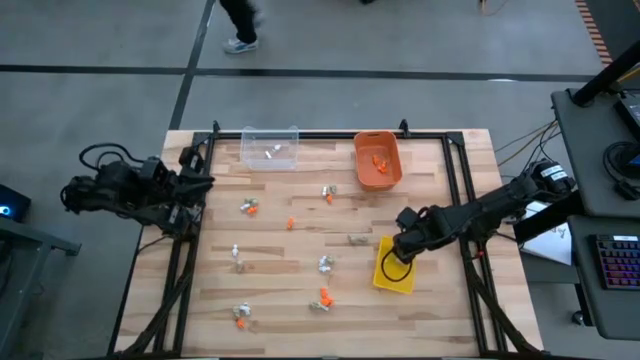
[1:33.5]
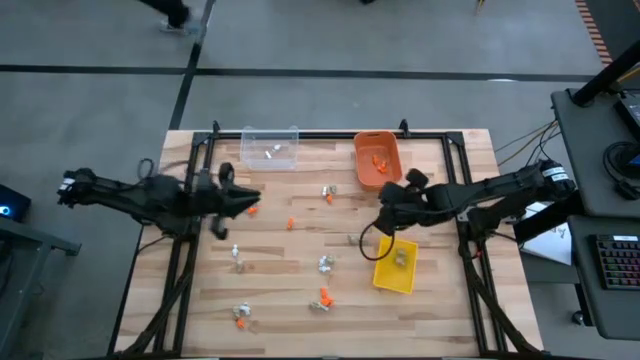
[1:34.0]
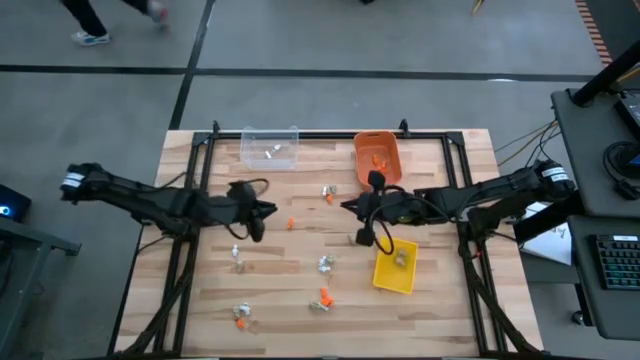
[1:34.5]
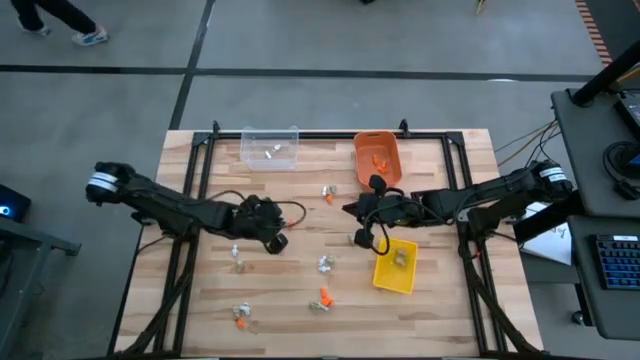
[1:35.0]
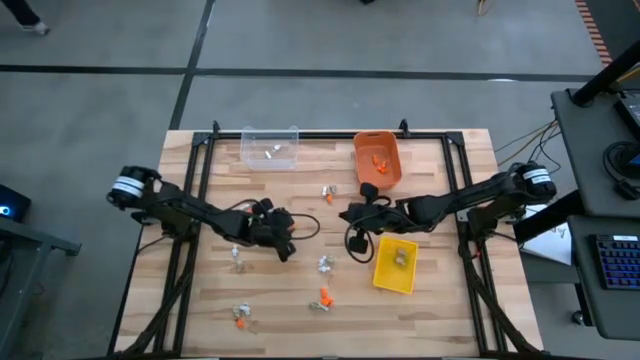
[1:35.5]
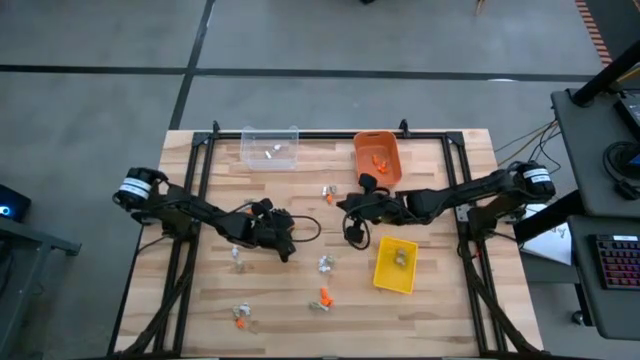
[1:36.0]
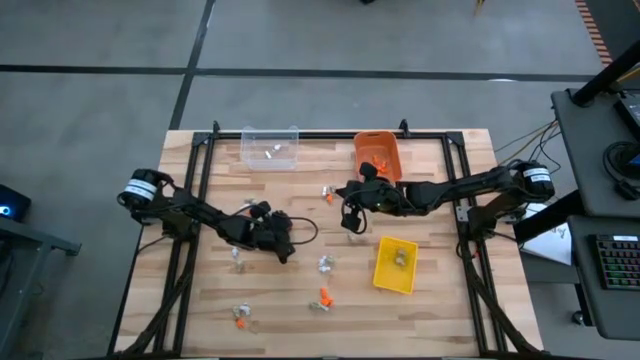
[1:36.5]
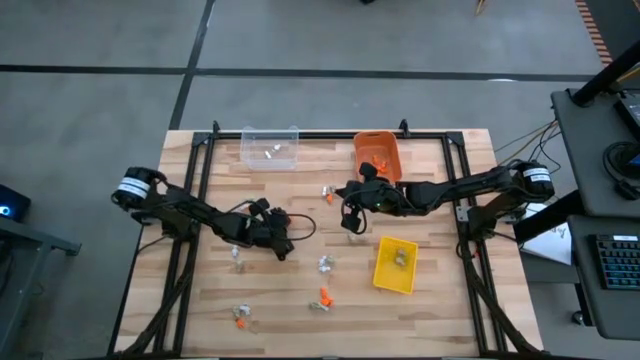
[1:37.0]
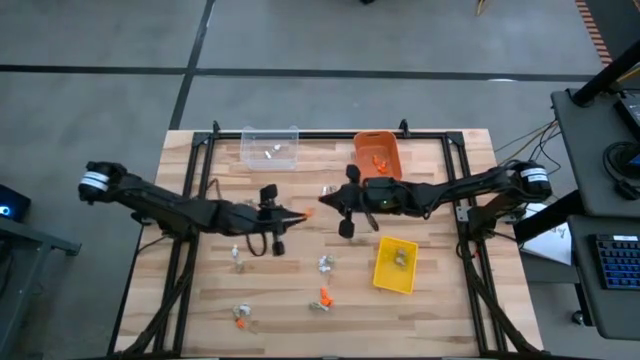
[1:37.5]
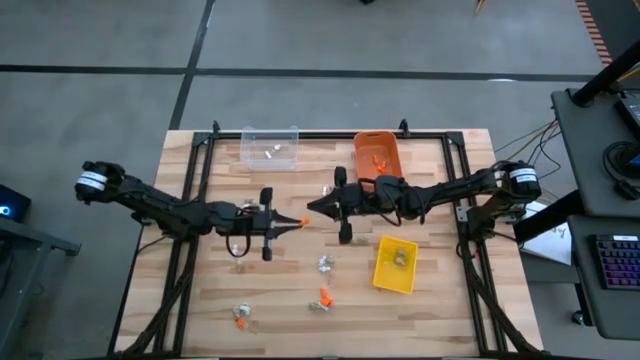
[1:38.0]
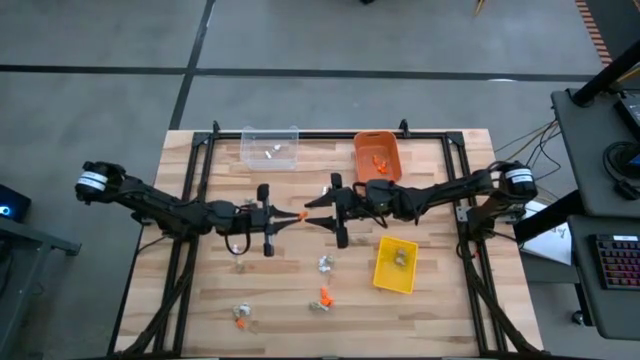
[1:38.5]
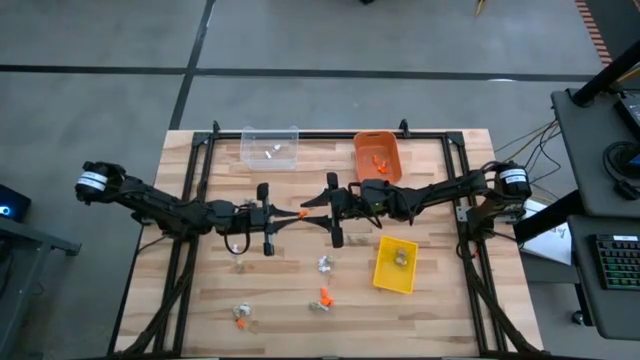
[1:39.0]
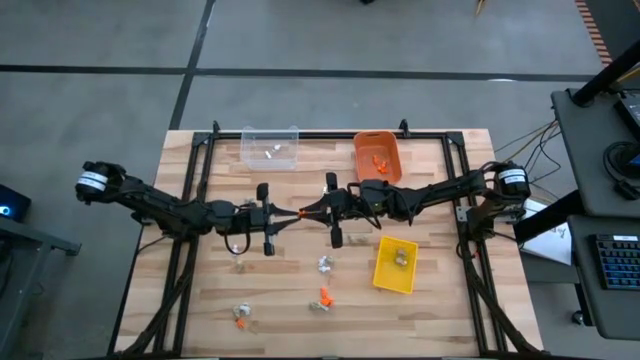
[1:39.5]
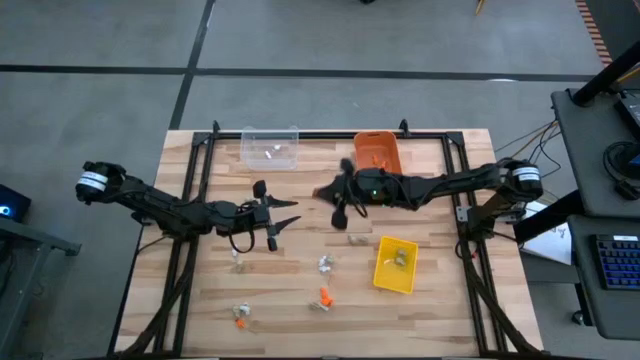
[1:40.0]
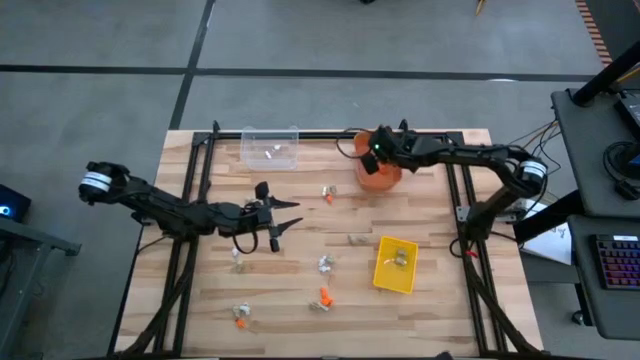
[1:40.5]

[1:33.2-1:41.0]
Task: Sort Halloween decoration
Put the orange skeleton toy into the orange bin

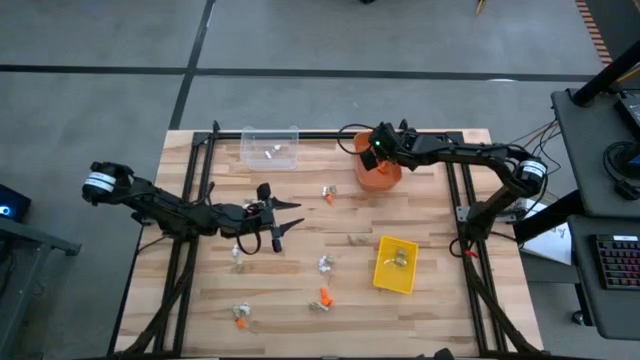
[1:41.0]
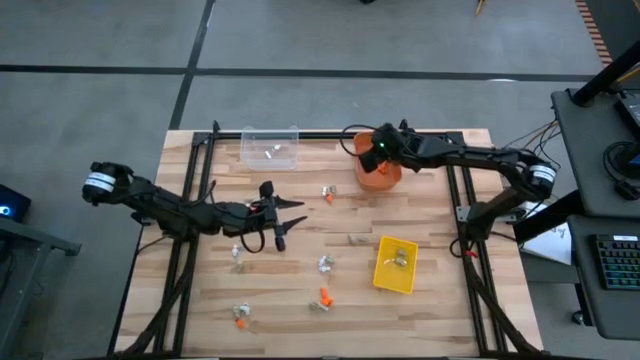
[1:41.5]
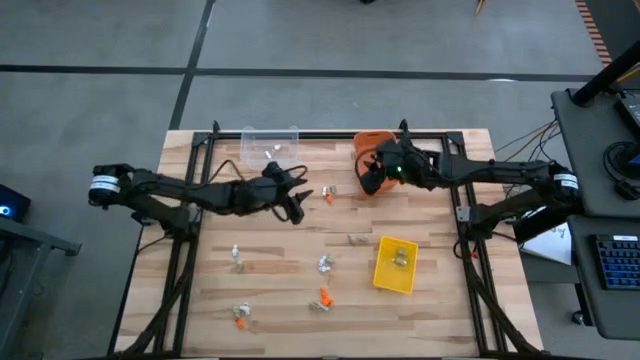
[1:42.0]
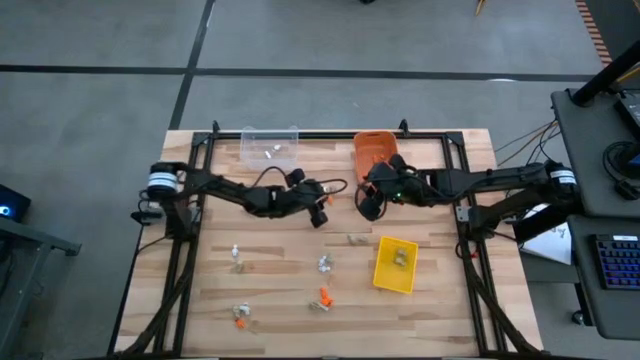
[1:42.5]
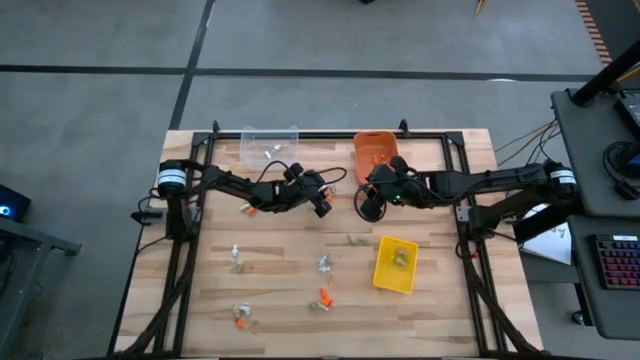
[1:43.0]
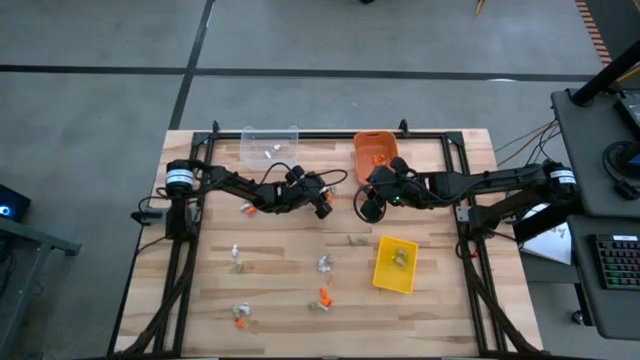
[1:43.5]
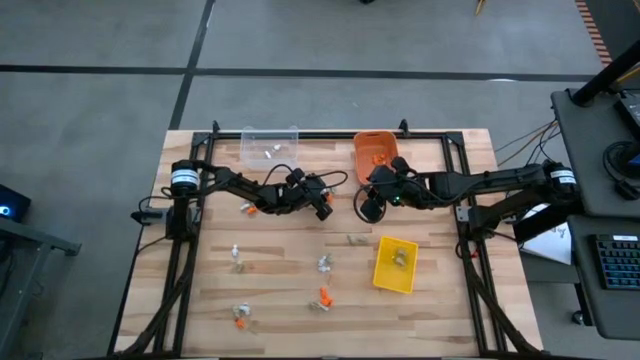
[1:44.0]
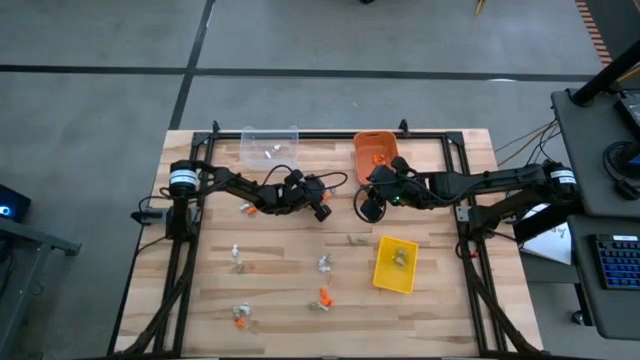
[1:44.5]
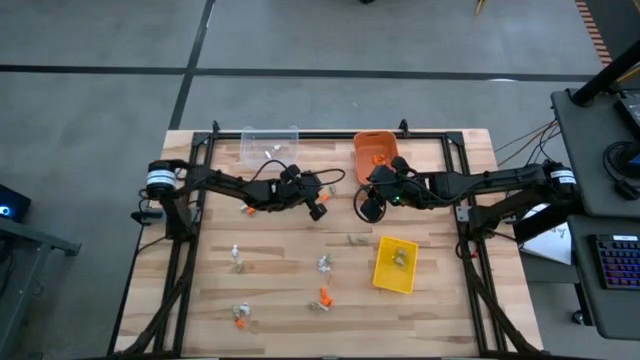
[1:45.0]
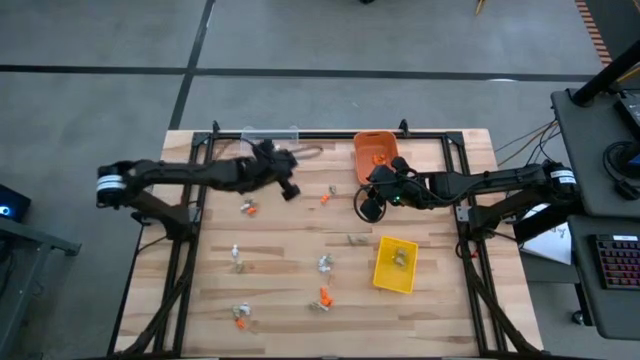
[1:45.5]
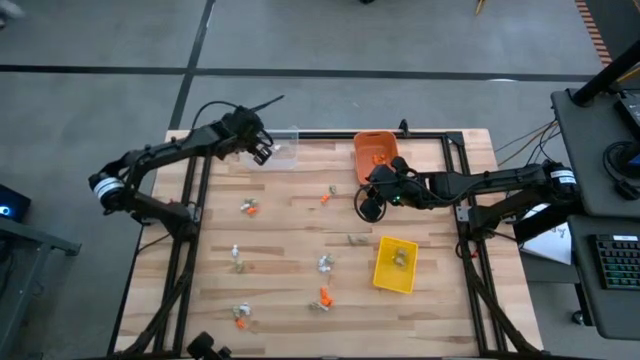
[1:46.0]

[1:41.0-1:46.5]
Put the white skeleton toy into the transparent bin

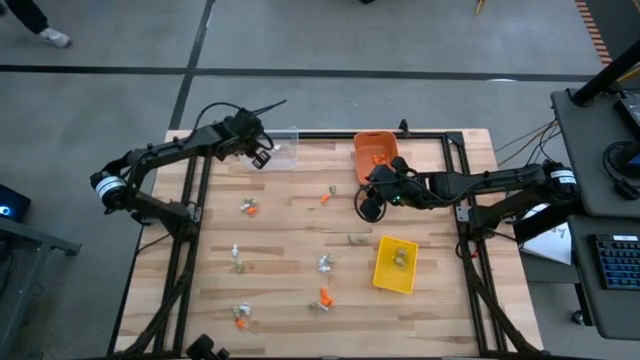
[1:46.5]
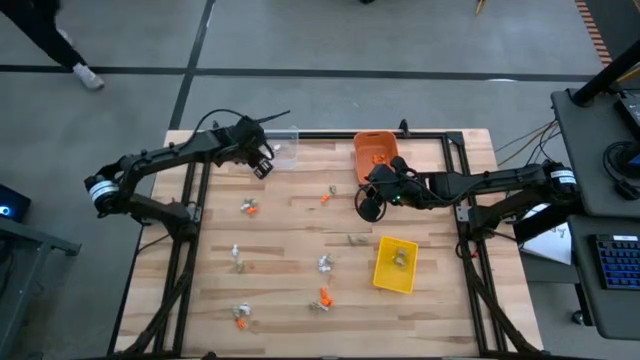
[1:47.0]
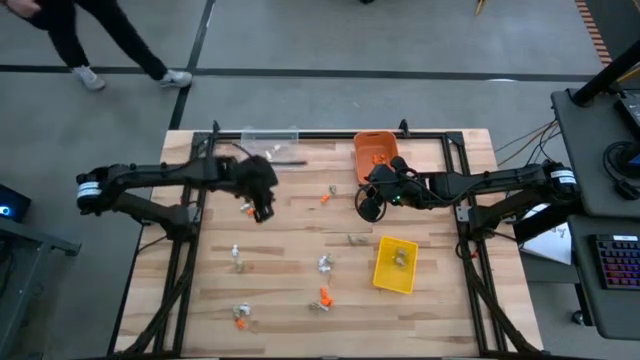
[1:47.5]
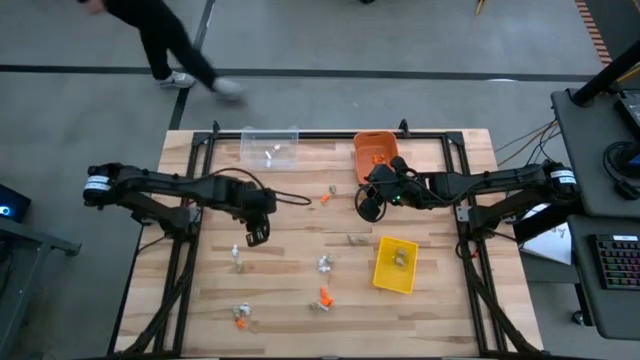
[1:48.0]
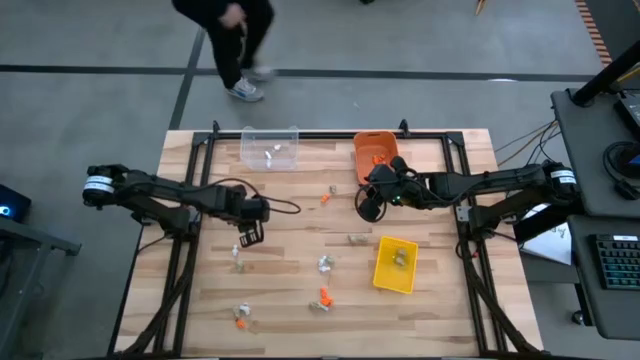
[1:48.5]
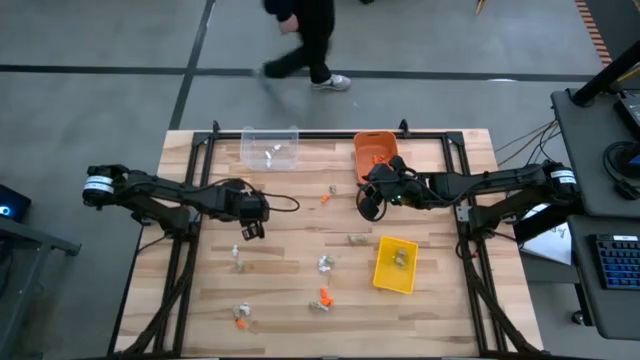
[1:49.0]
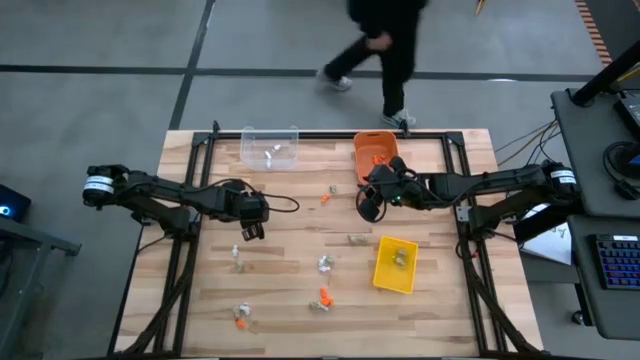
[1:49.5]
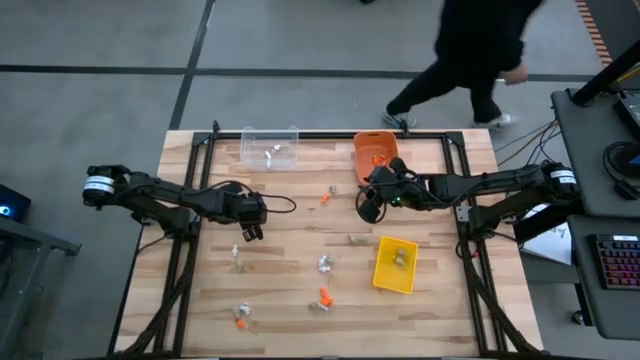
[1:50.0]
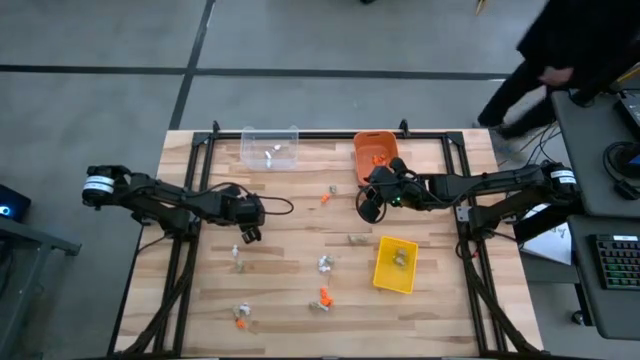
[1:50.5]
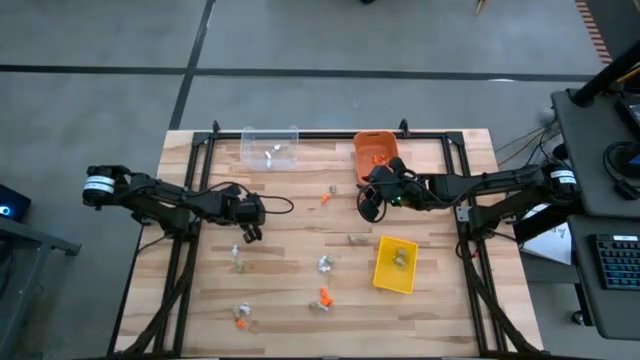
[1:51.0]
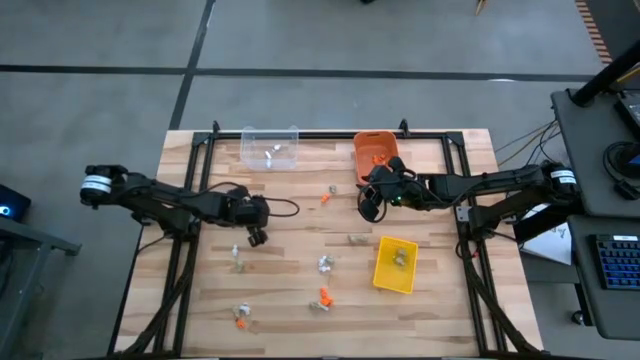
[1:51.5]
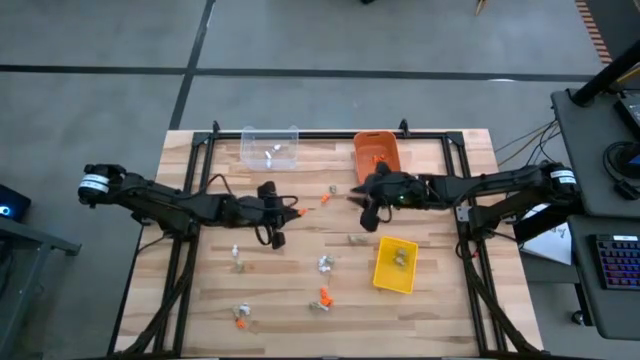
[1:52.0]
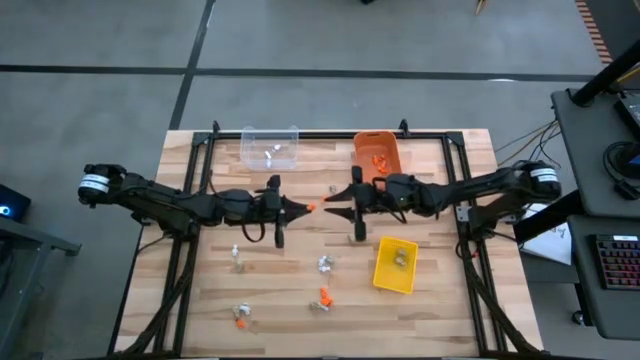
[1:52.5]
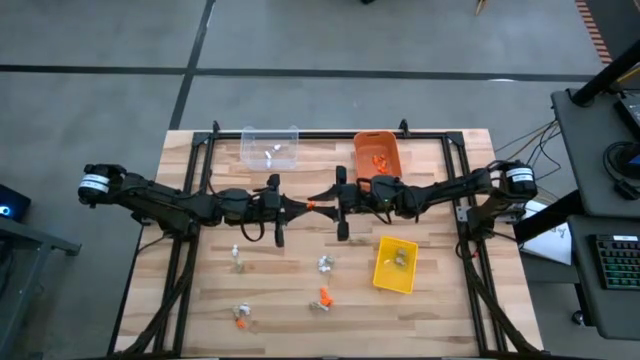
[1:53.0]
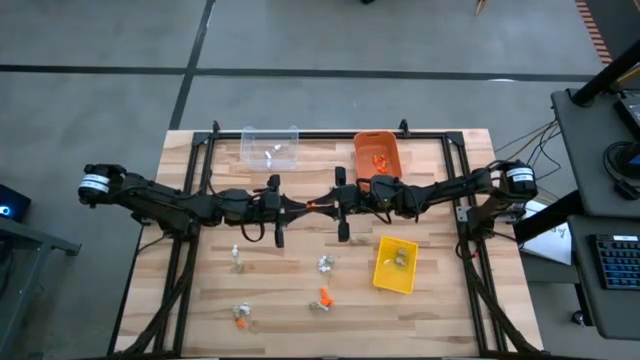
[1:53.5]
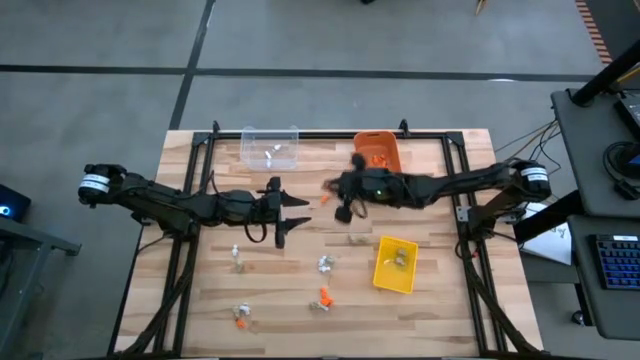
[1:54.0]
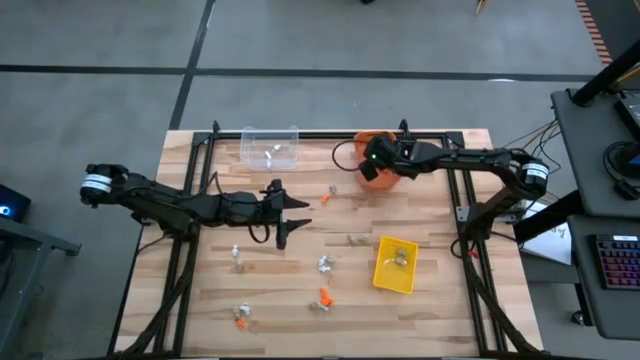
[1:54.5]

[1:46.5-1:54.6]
Put the orange skeleton toy into the orange bin
